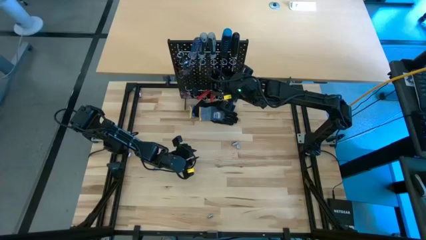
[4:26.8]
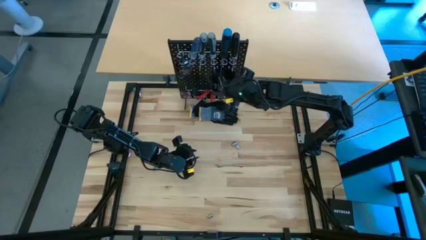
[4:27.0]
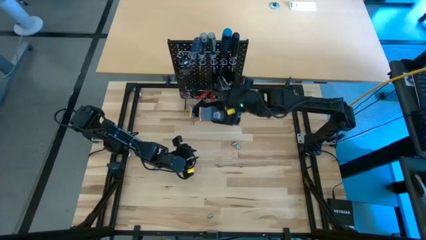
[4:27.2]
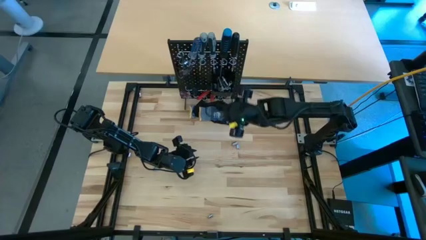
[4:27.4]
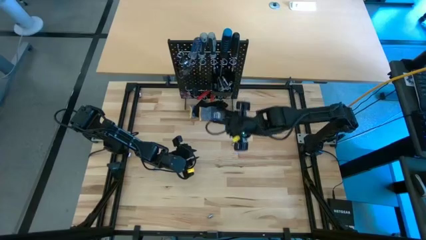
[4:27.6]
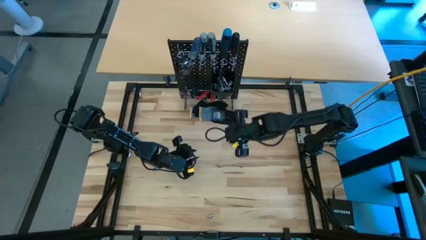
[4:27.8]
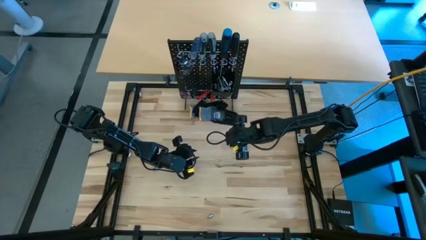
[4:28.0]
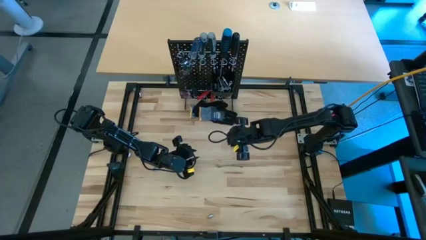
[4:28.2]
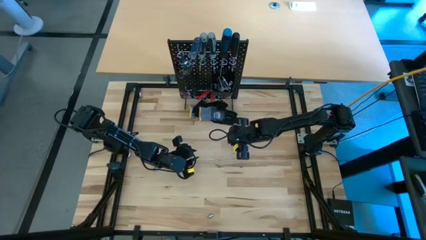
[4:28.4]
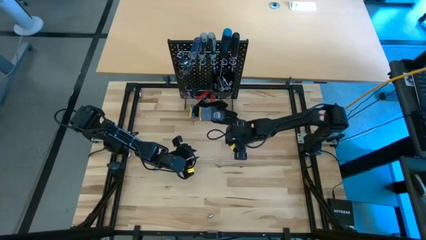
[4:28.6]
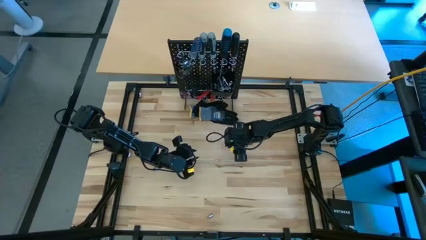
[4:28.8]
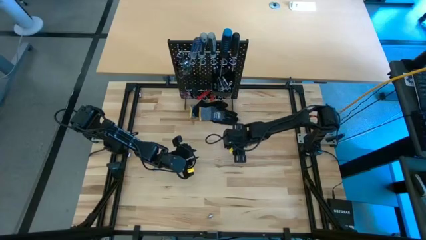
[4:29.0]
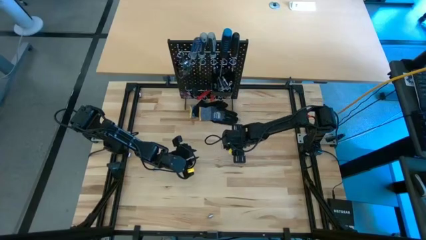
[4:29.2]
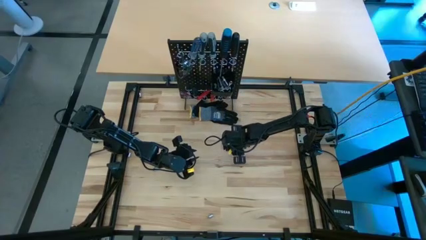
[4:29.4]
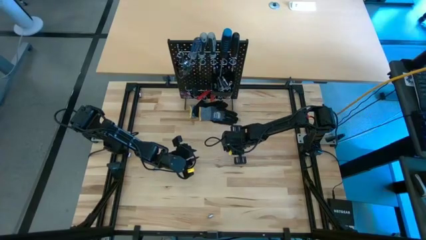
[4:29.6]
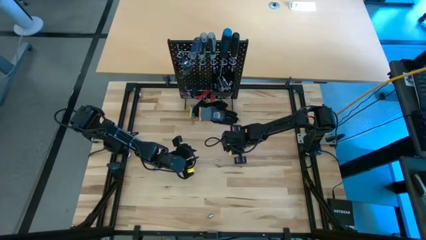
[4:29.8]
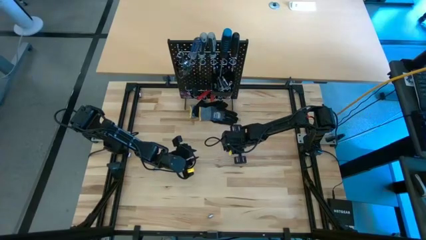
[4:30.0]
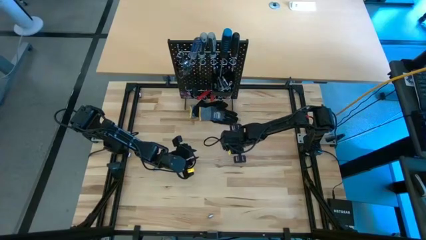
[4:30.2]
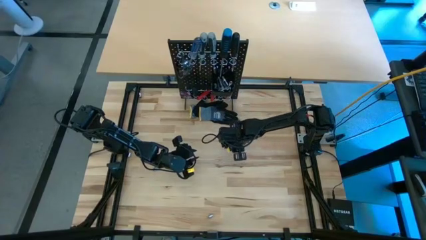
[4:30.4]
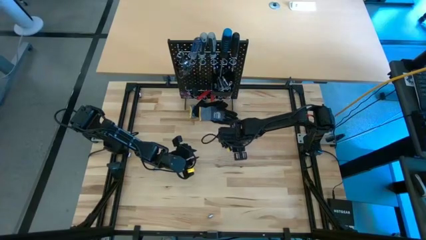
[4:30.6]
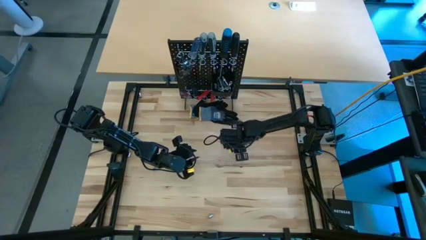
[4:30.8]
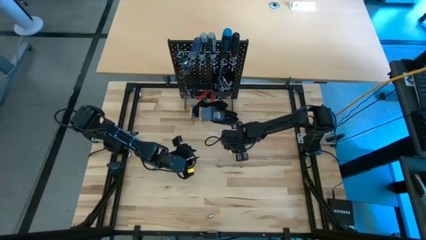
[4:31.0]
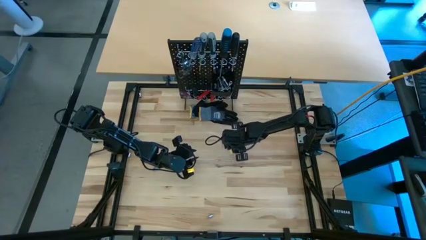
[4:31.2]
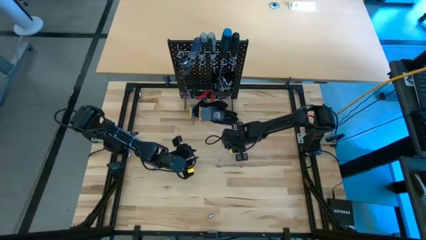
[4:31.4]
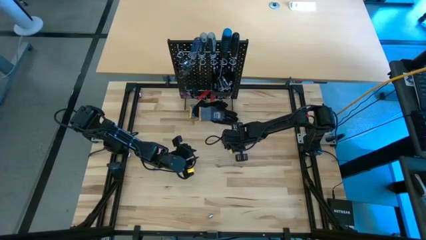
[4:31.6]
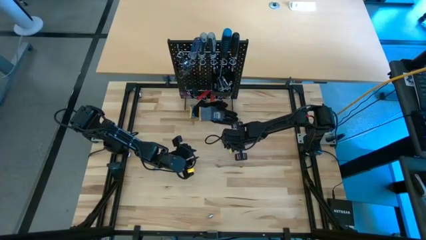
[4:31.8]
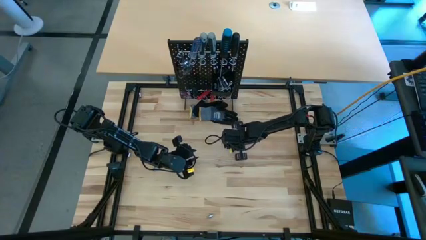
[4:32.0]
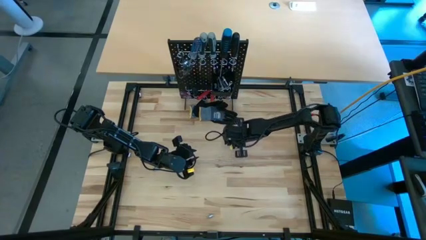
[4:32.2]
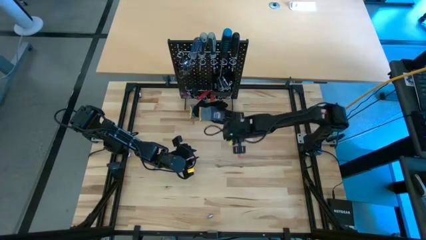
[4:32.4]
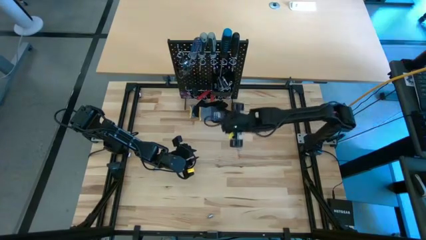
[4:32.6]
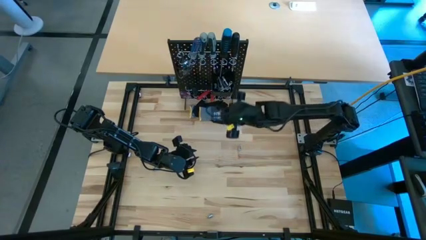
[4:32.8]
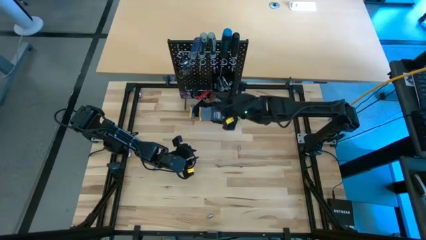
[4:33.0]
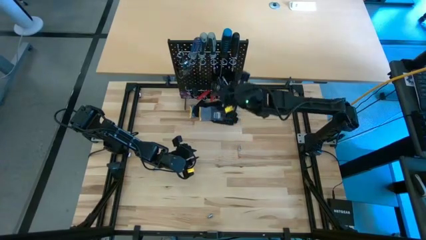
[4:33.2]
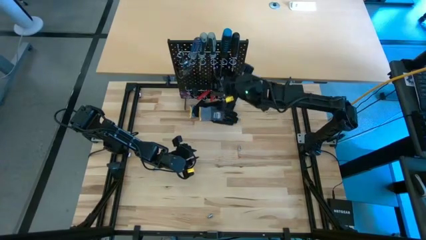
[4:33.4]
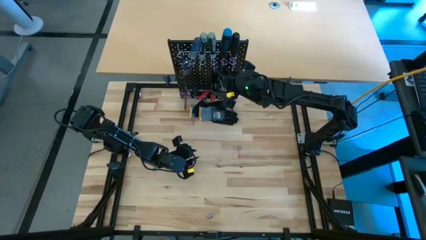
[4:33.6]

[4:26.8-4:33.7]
Task: Hang tools onto peg board
Put the socket into the pegboard bin

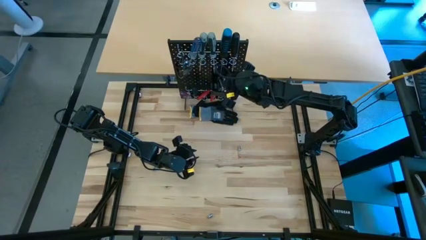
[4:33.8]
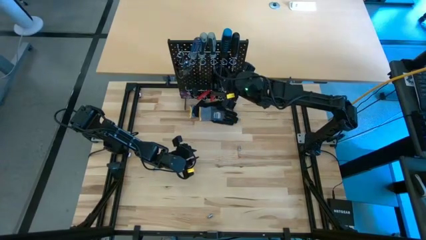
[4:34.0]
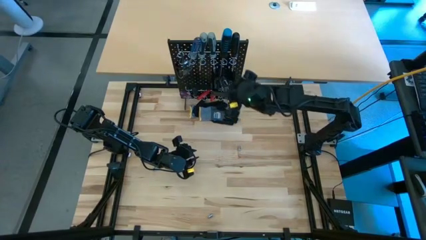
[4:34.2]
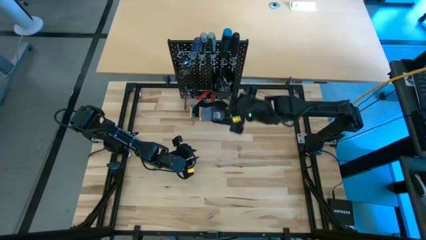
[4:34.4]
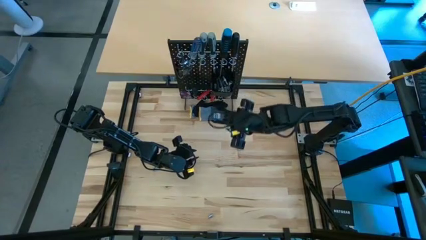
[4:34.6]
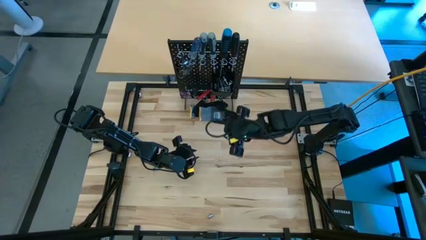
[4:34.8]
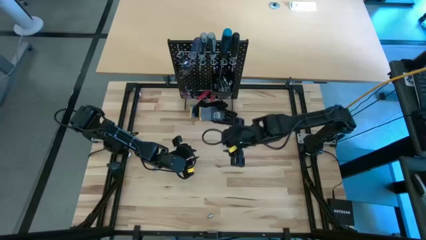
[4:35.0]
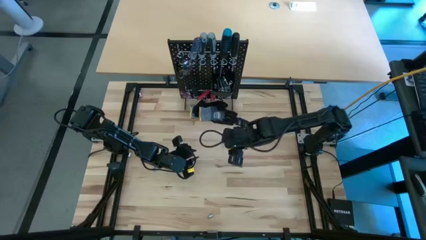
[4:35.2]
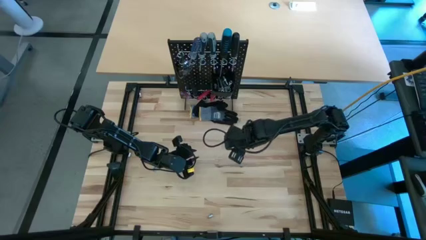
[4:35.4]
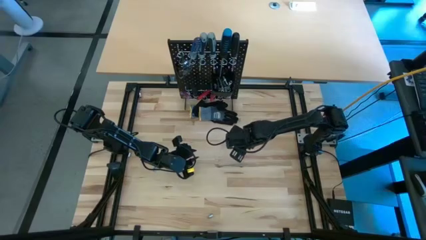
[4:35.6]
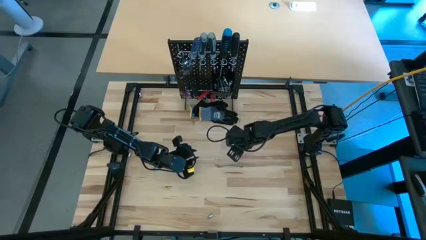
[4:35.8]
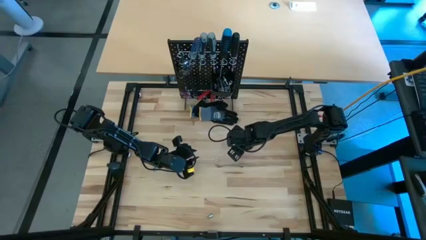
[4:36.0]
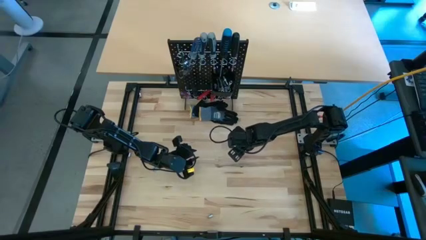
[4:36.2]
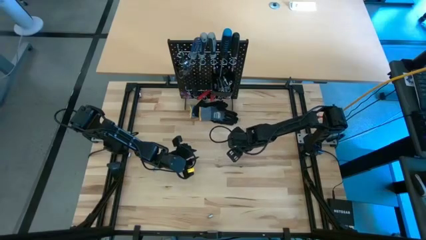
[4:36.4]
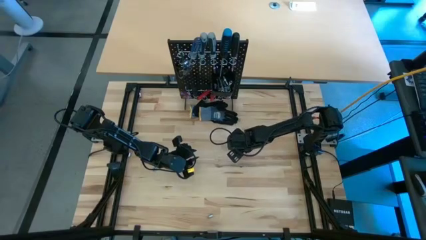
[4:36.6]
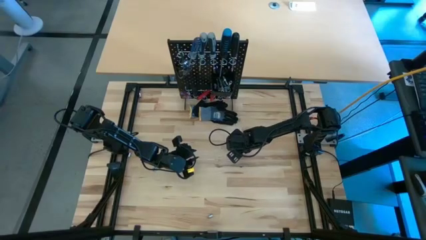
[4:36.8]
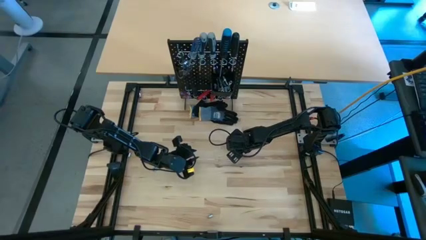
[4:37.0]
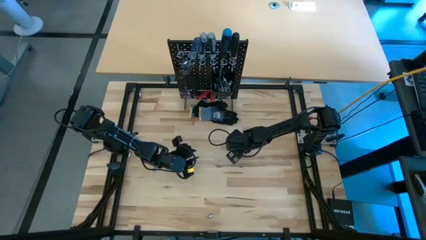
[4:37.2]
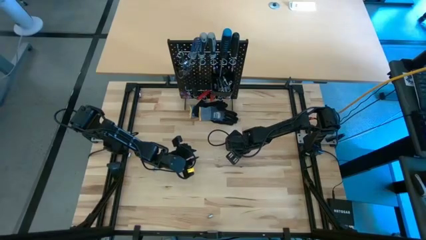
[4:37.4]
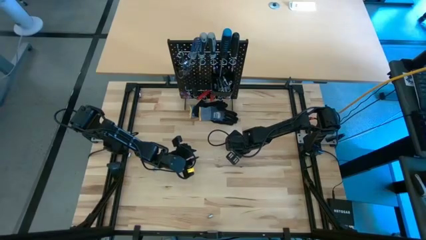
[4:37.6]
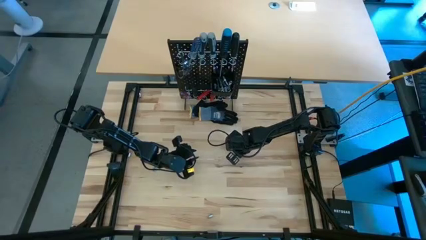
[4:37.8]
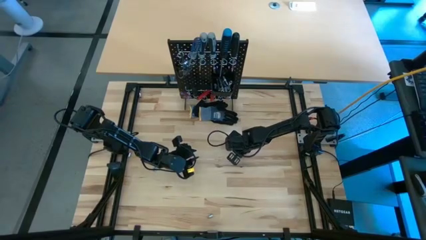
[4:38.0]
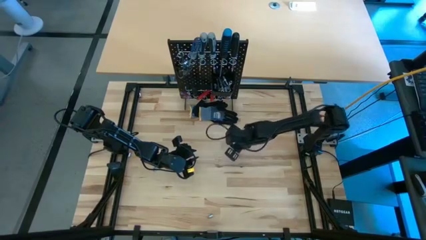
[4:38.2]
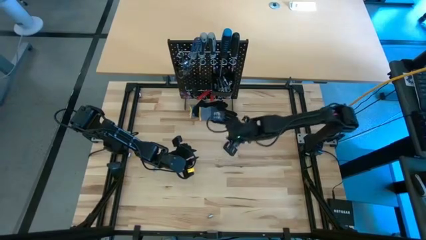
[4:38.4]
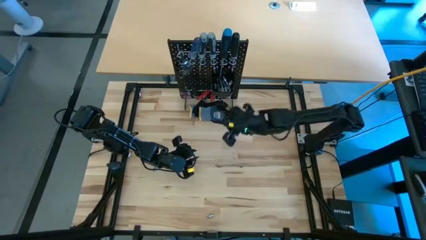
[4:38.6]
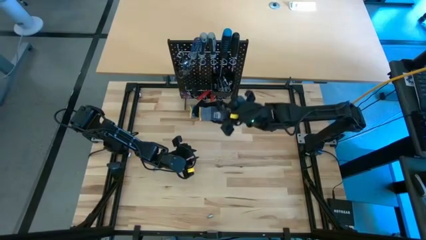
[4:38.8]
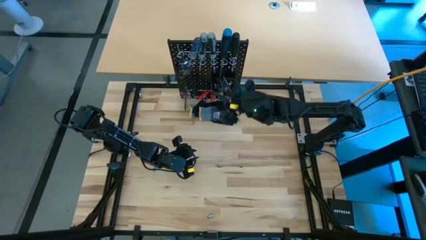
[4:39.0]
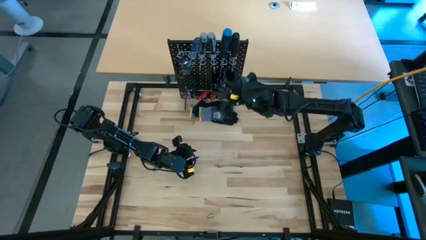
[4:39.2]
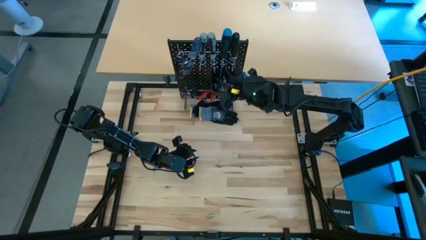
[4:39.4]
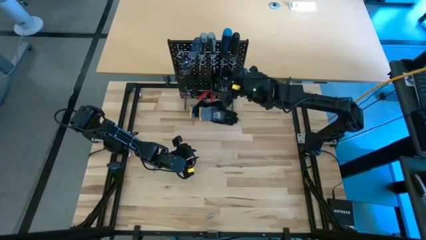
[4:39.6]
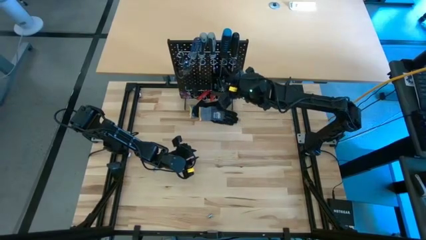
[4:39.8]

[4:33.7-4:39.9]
Put the socket into the pegboard bin

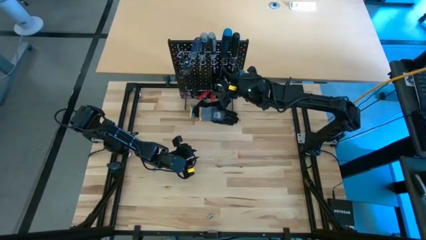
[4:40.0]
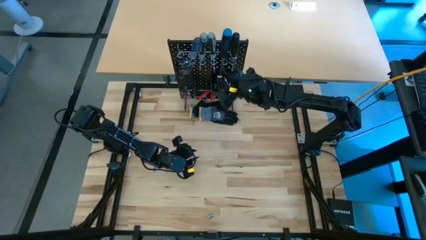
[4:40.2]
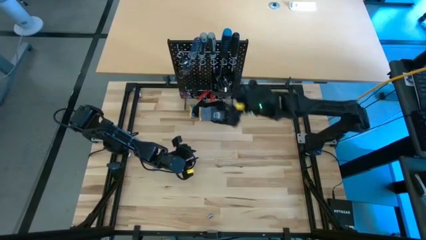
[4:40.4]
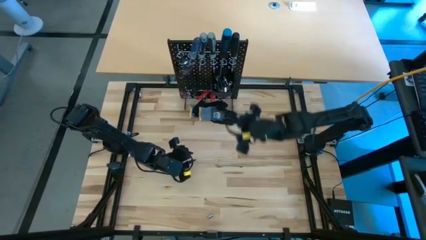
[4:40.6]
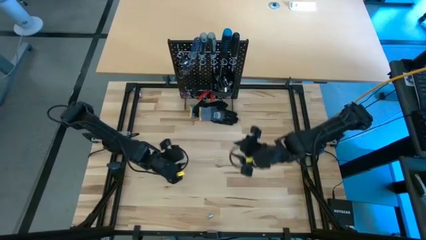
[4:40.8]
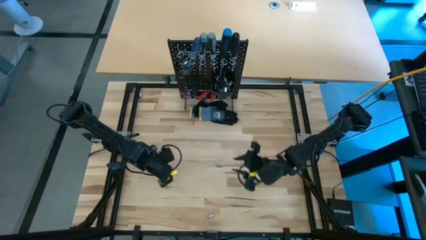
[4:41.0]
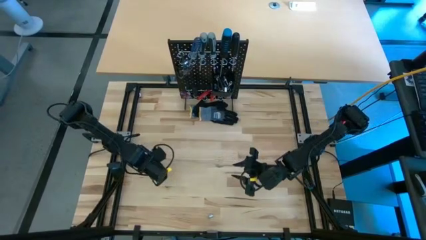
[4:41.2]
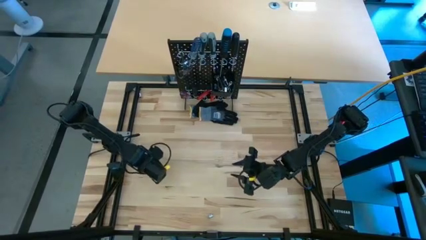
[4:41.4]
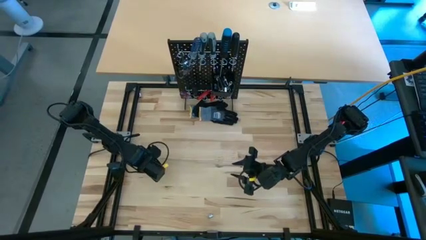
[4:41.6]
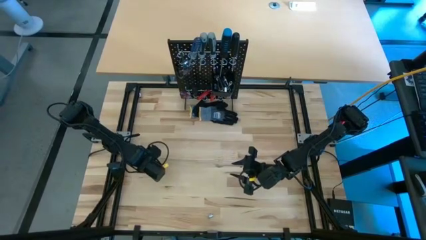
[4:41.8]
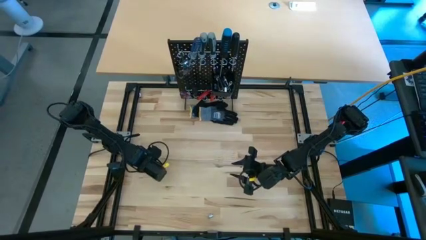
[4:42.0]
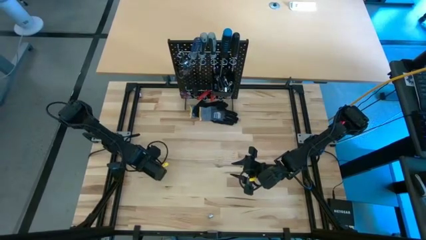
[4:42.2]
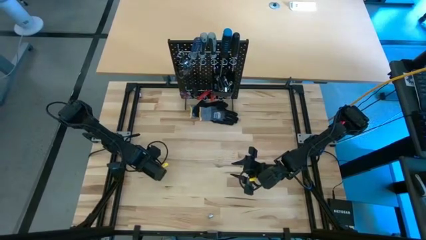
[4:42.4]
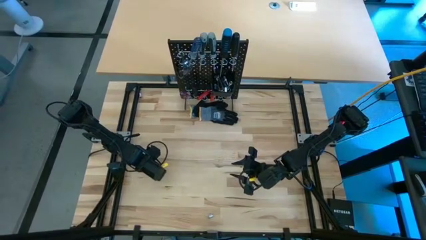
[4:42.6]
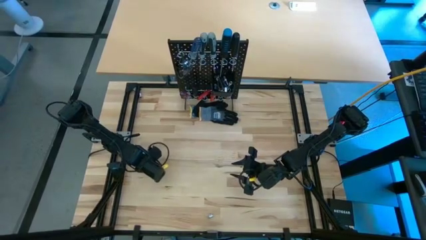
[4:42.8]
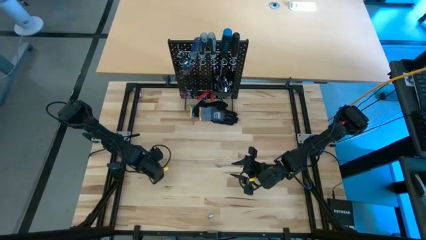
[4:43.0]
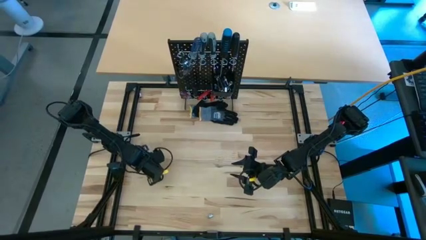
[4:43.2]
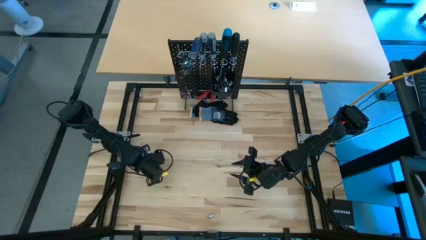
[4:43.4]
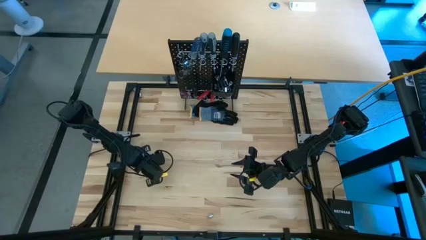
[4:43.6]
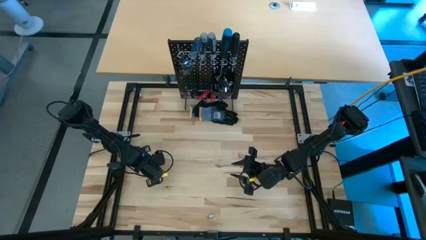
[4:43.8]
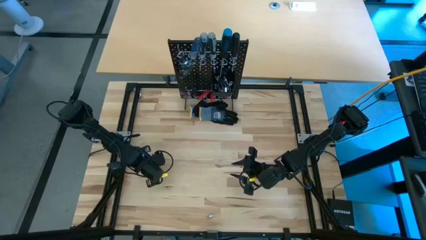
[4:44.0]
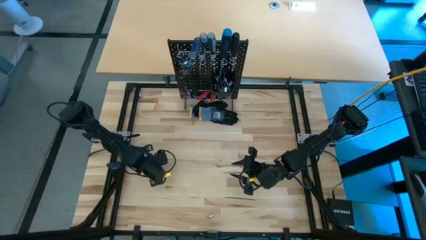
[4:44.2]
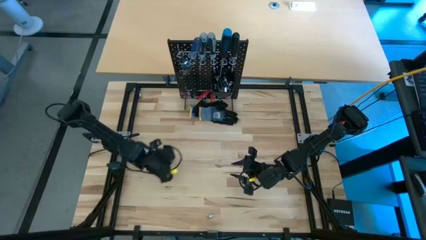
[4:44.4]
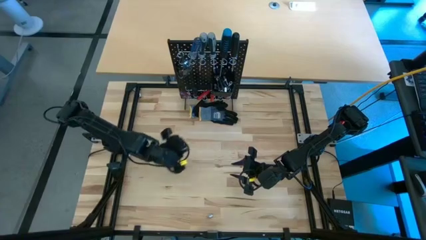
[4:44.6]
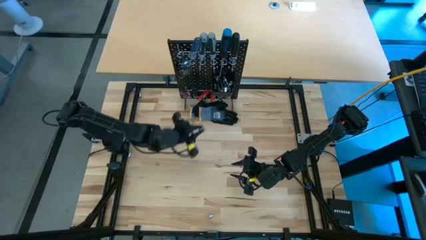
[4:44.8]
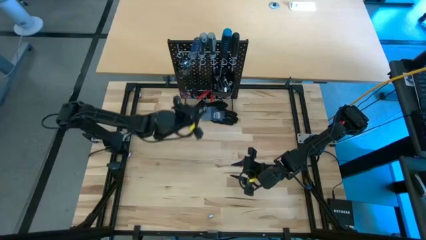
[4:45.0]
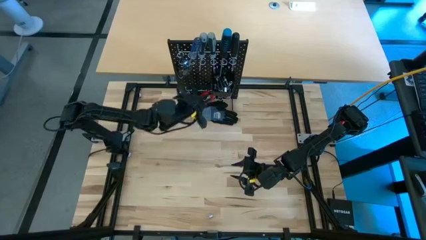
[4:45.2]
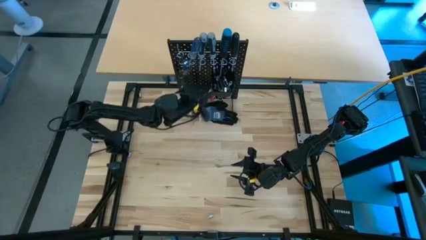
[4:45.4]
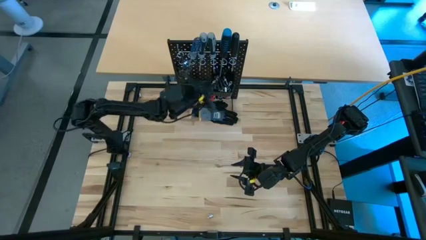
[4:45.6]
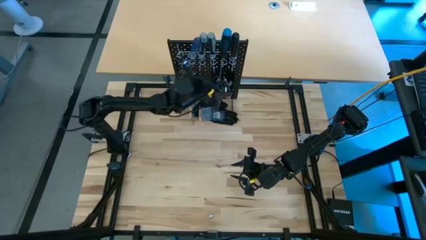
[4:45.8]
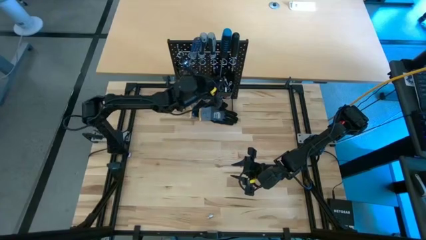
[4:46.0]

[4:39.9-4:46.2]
Put the socket into the pegboard bin
